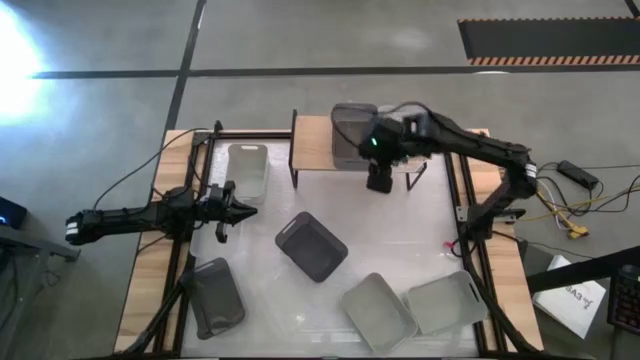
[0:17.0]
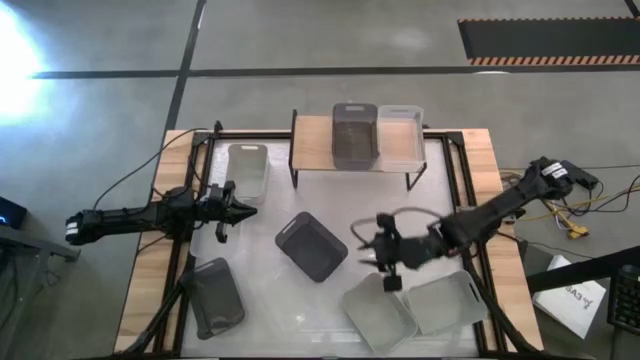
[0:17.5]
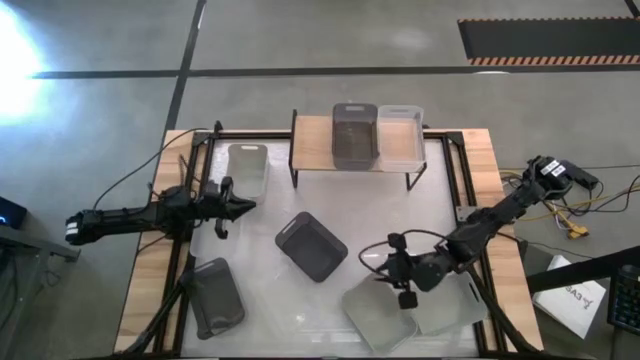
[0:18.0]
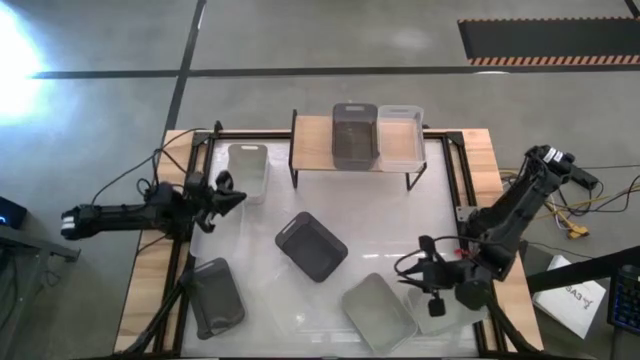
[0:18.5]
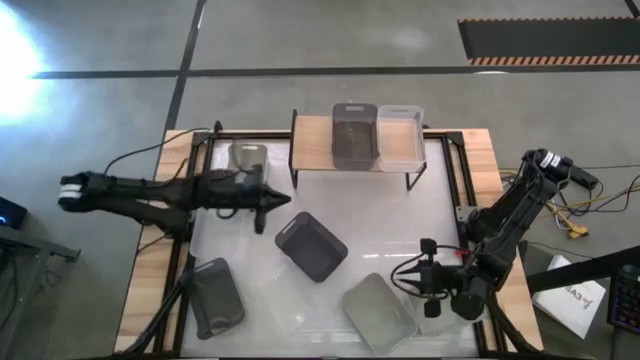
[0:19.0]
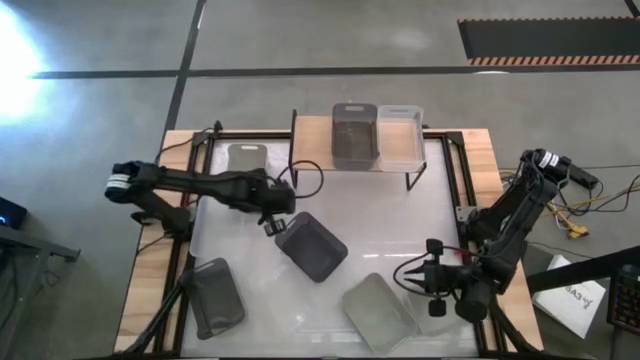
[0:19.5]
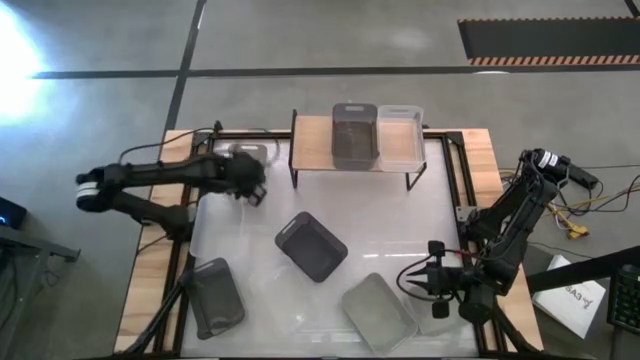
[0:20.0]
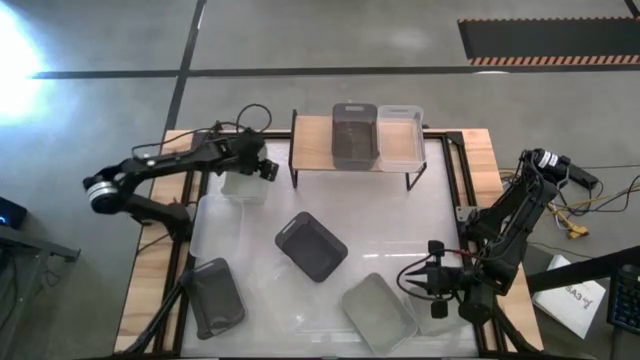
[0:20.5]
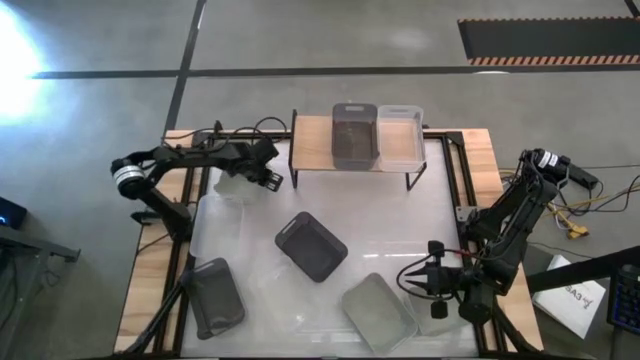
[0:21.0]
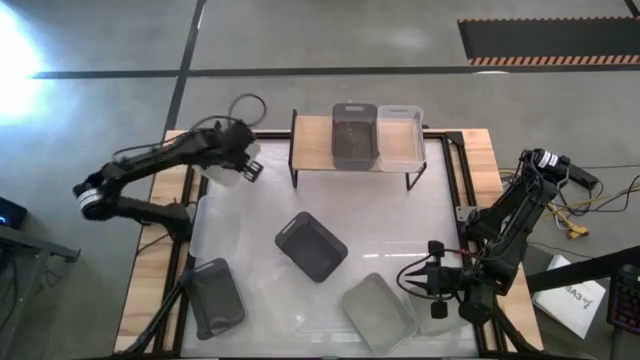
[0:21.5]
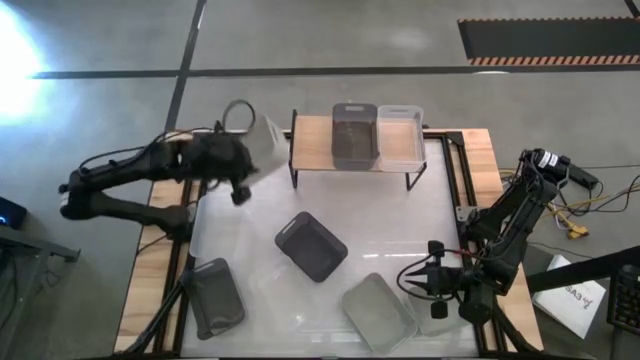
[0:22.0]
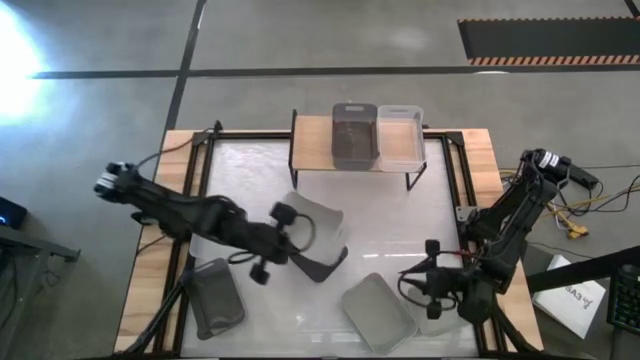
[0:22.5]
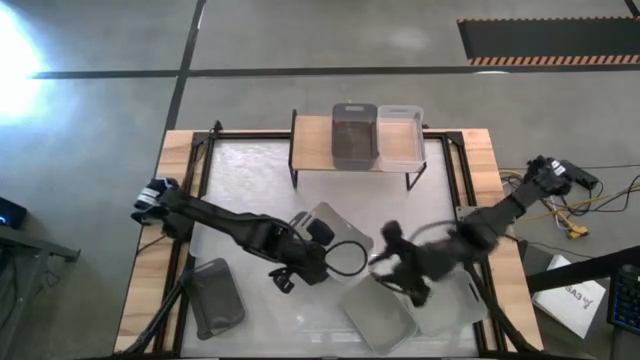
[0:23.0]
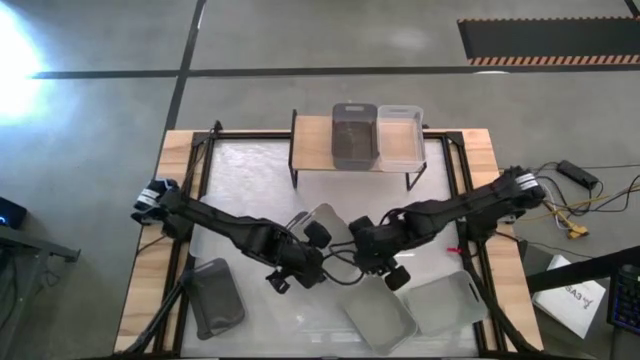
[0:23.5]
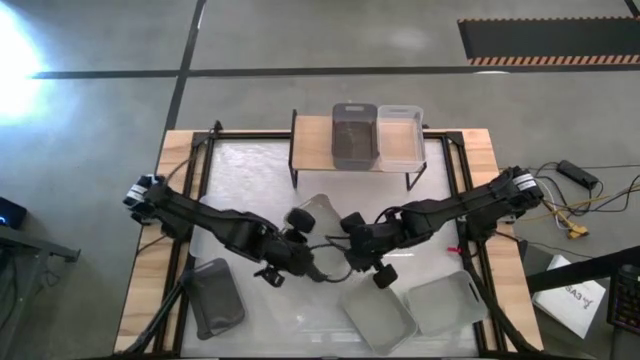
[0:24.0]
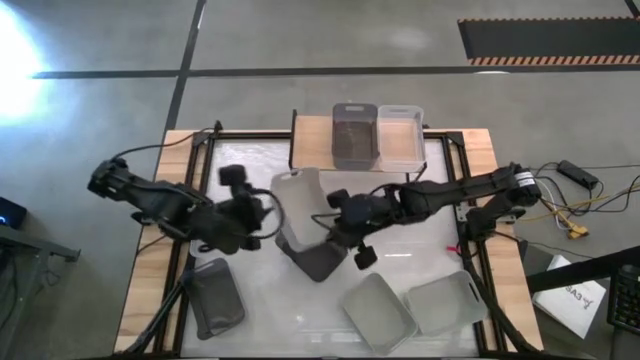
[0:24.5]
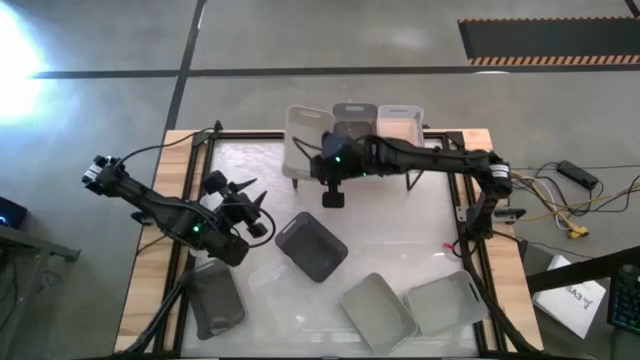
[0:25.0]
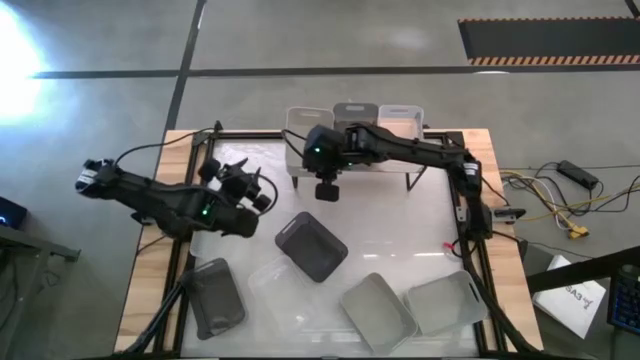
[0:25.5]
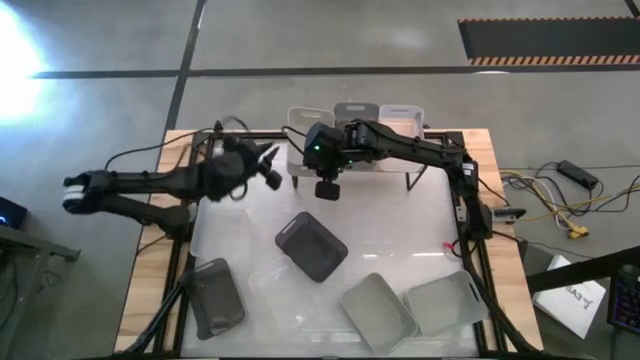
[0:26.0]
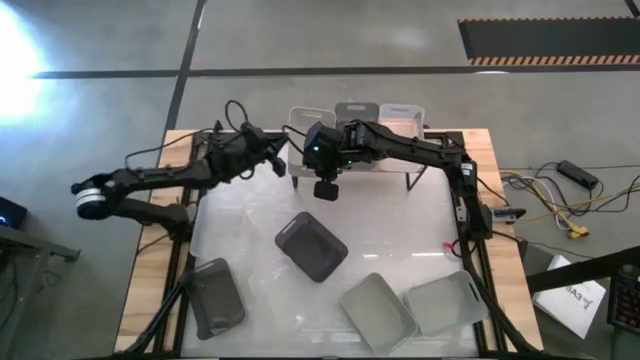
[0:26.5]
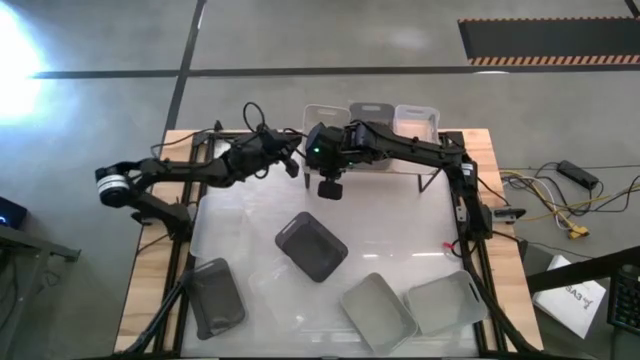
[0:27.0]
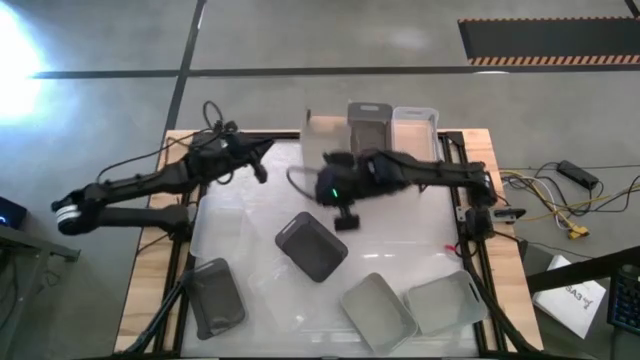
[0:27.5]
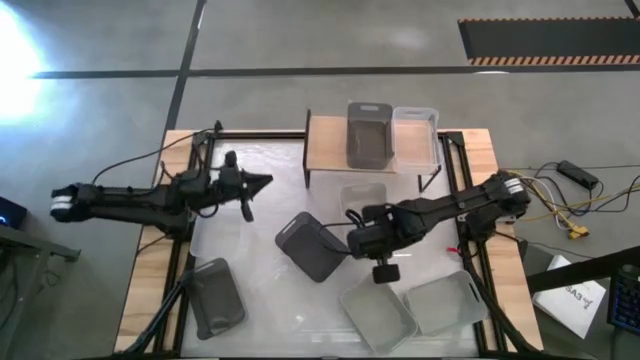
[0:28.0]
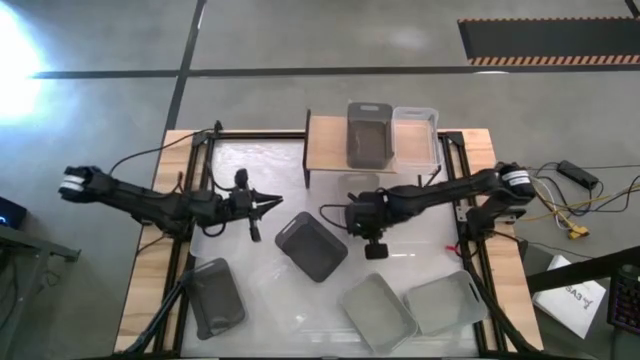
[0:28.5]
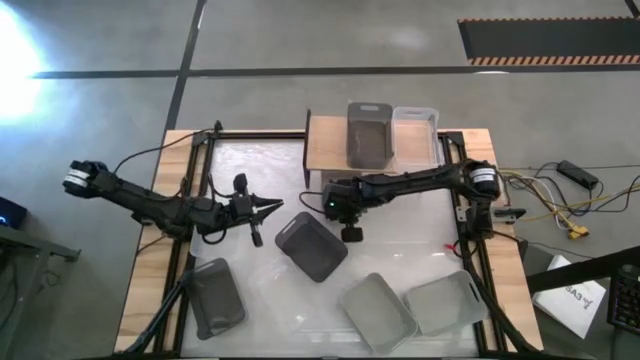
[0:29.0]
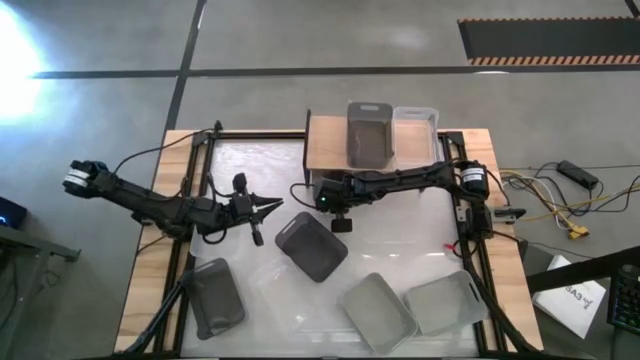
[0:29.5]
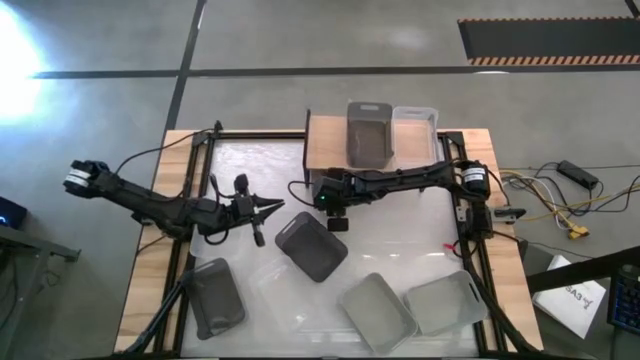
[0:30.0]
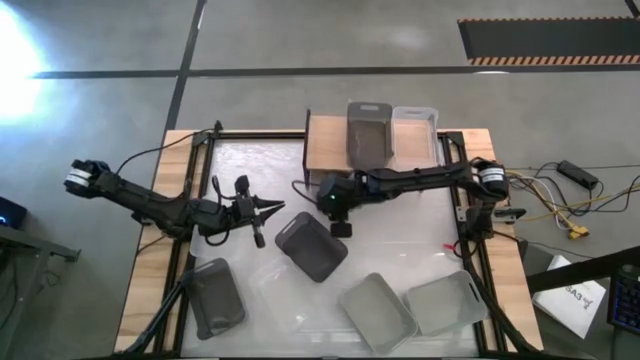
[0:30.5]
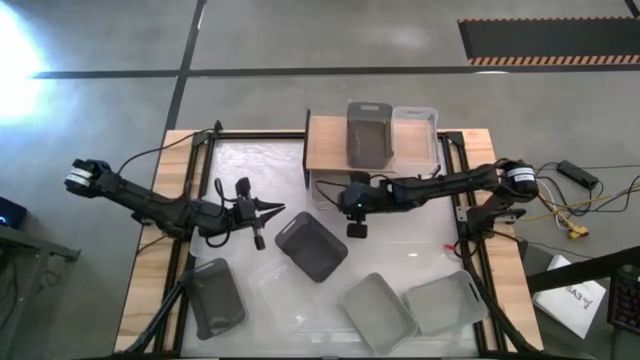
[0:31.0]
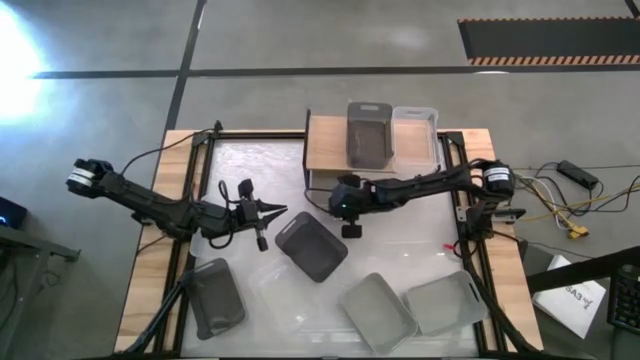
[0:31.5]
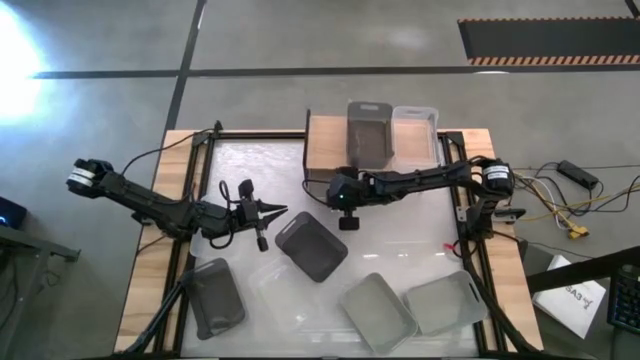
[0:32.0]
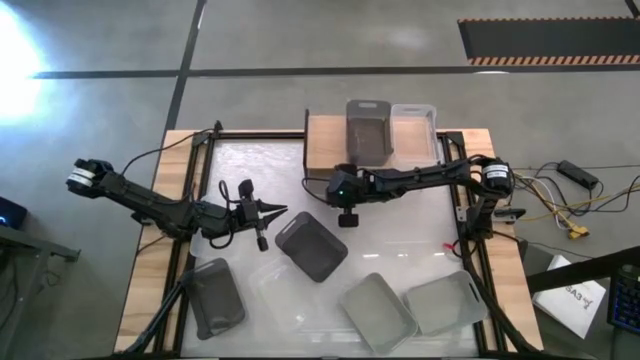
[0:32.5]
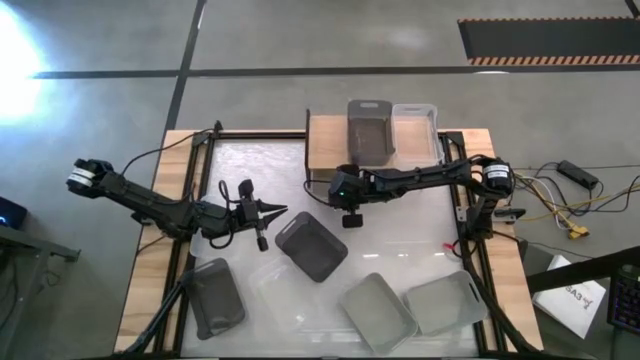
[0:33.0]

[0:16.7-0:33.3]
Task: Stack baskets on shelf by color
Put the top gray bin on the shelf

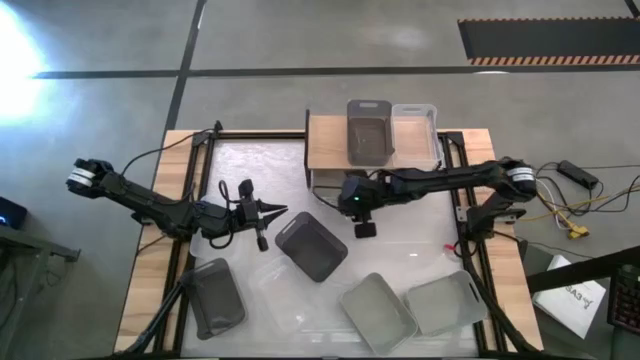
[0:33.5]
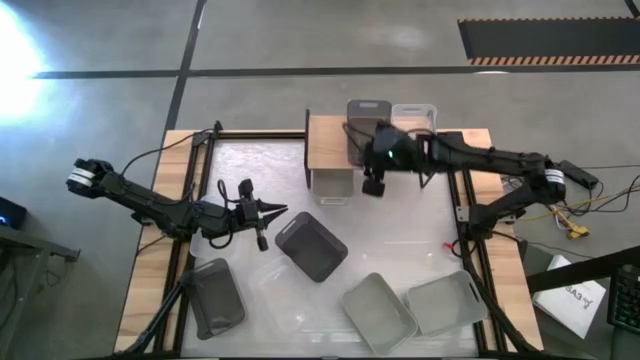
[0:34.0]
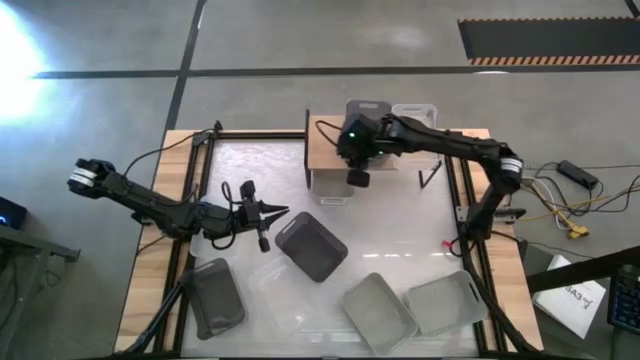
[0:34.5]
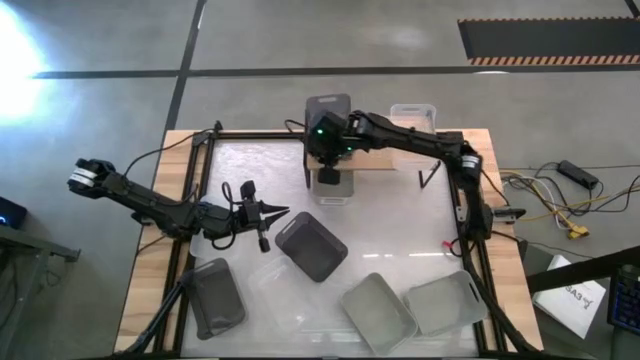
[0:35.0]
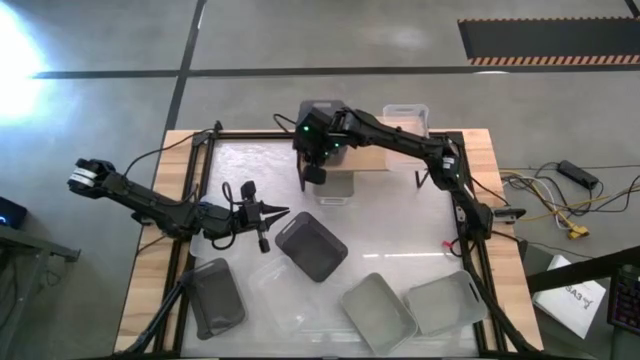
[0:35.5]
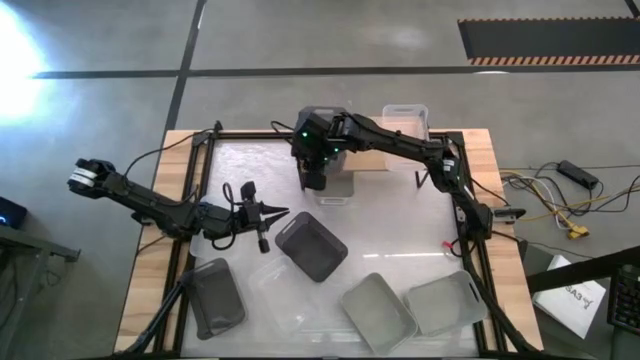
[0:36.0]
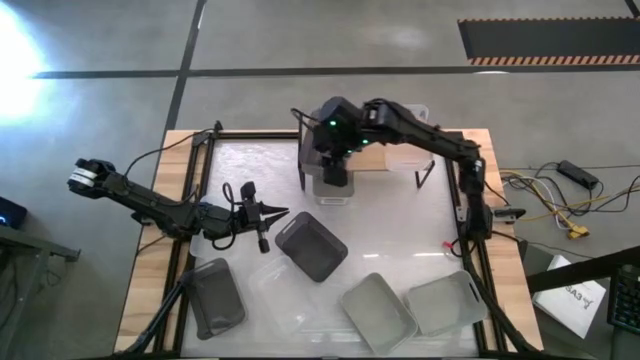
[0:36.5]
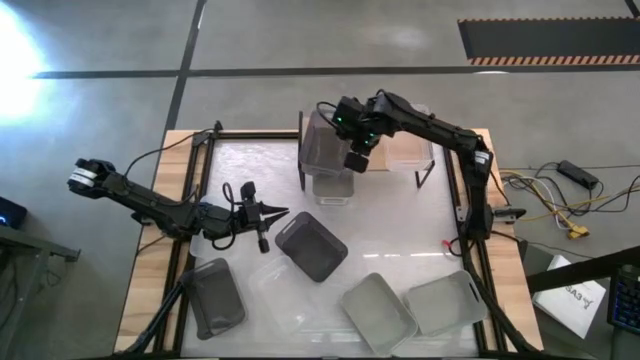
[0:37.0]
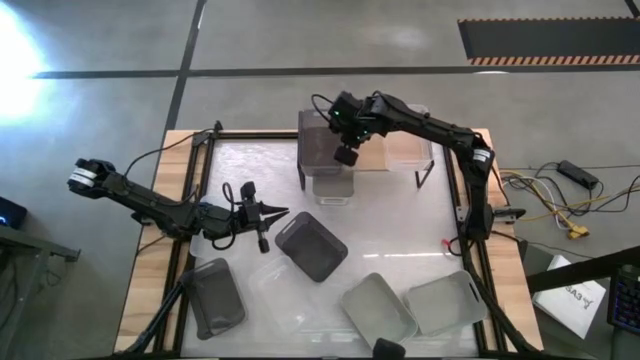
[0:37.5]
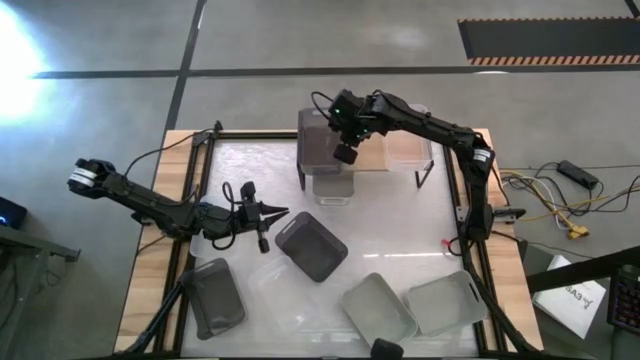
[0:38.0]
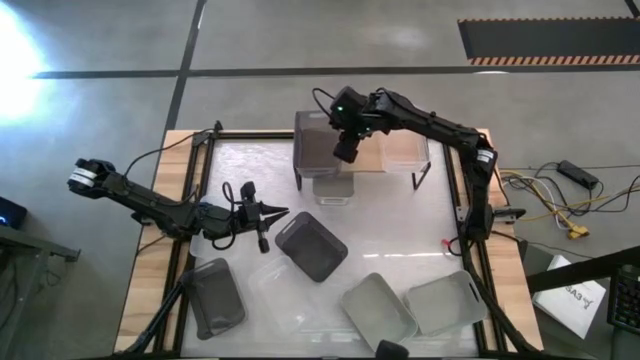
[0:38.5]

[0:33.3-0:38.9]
Adjust the black bin on the shelf
